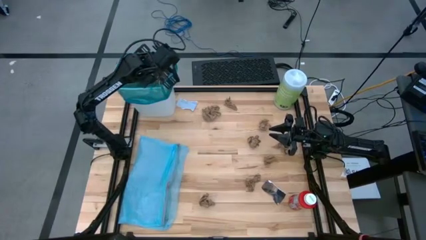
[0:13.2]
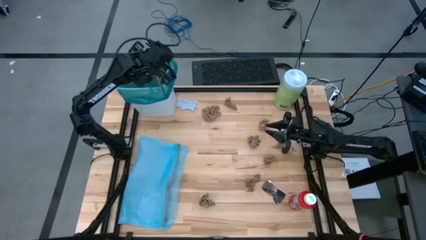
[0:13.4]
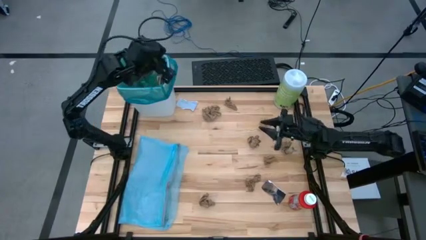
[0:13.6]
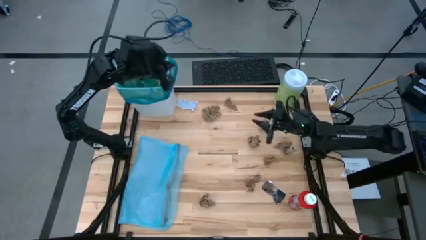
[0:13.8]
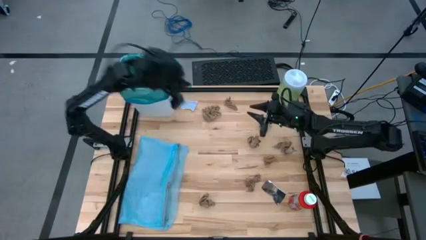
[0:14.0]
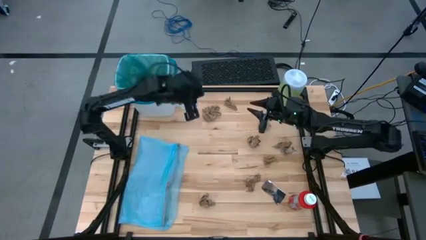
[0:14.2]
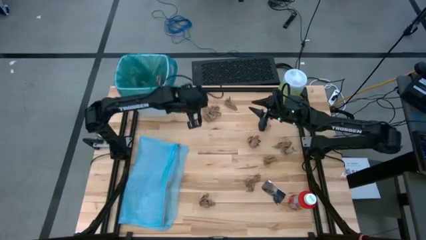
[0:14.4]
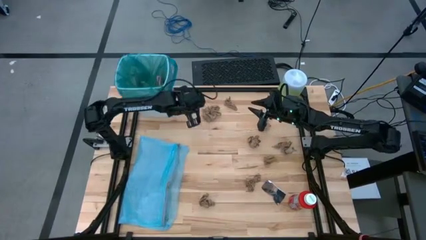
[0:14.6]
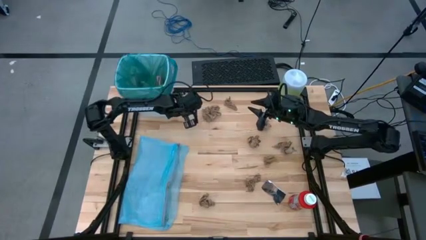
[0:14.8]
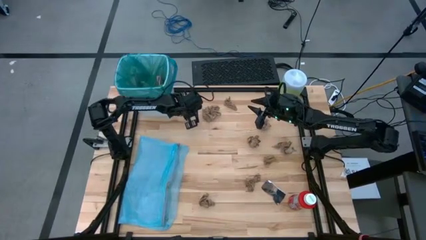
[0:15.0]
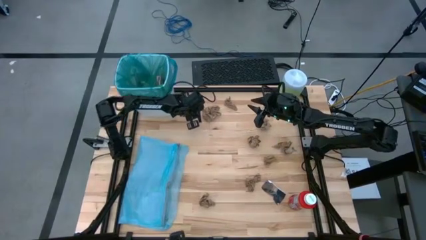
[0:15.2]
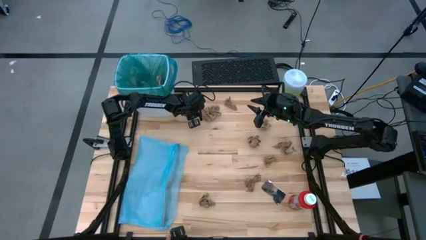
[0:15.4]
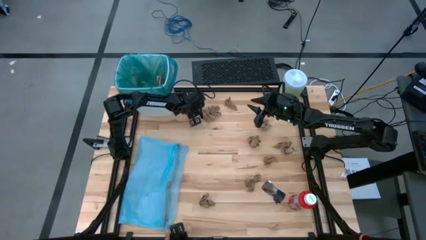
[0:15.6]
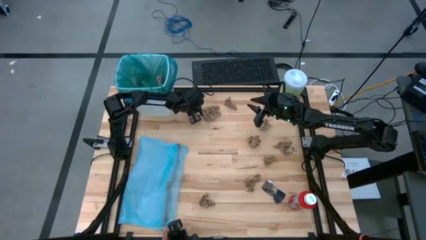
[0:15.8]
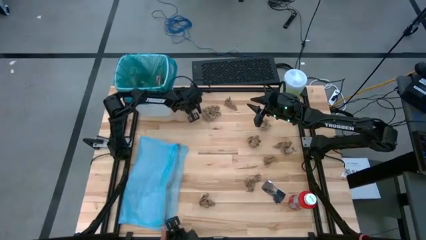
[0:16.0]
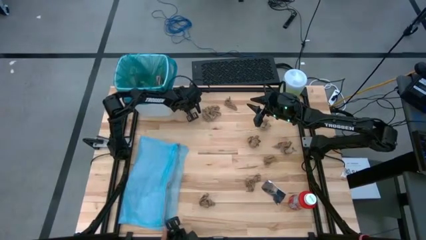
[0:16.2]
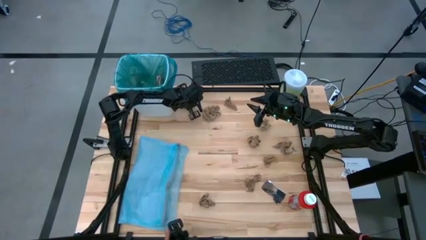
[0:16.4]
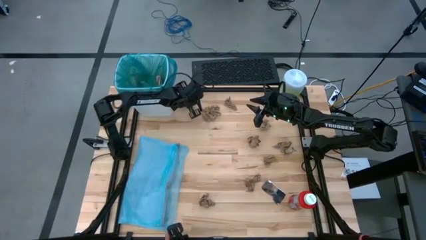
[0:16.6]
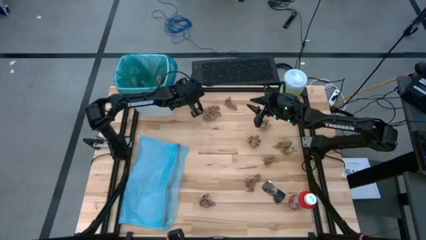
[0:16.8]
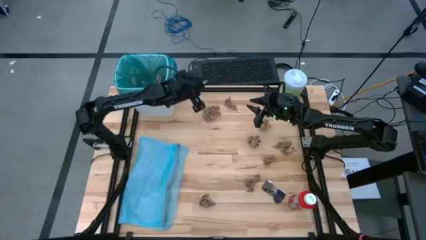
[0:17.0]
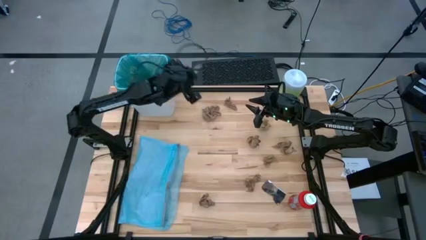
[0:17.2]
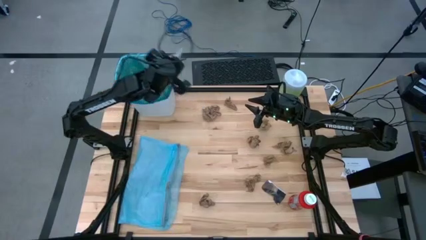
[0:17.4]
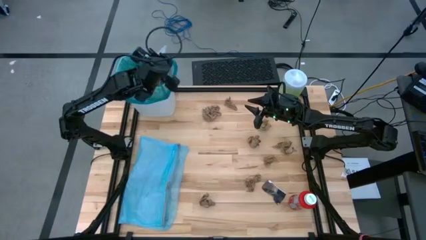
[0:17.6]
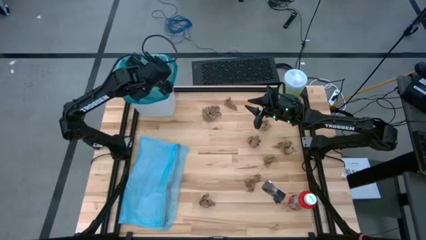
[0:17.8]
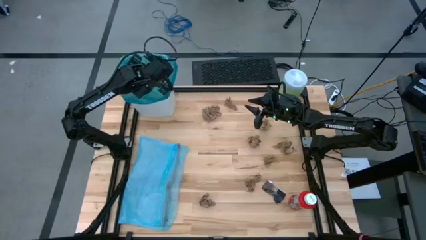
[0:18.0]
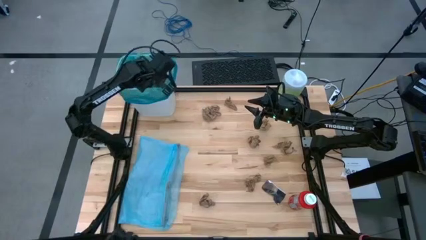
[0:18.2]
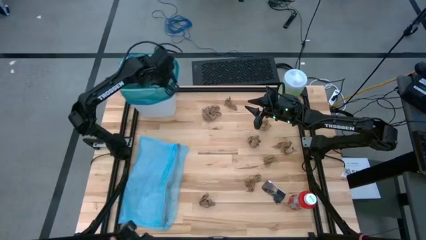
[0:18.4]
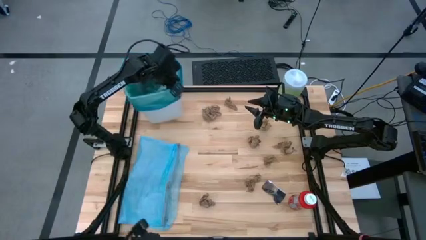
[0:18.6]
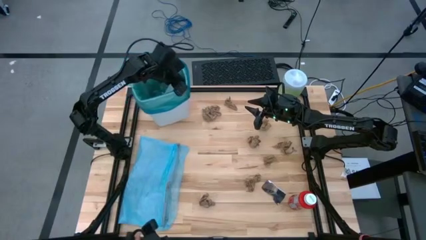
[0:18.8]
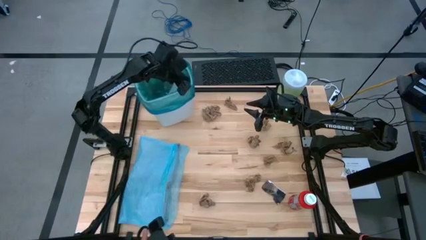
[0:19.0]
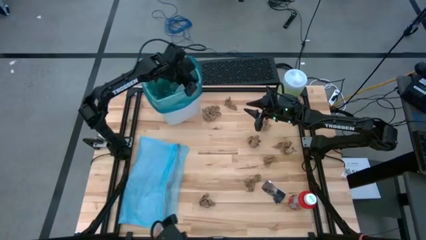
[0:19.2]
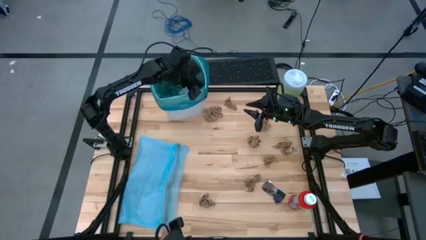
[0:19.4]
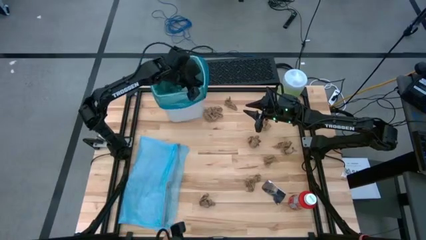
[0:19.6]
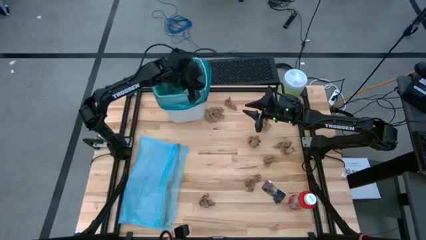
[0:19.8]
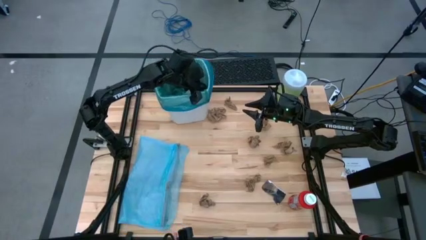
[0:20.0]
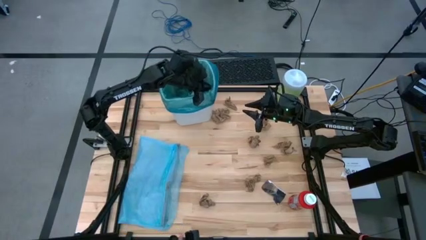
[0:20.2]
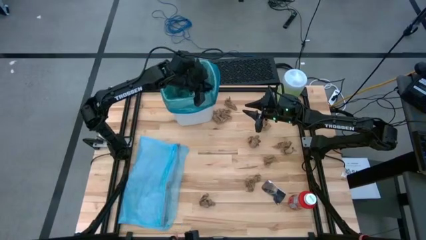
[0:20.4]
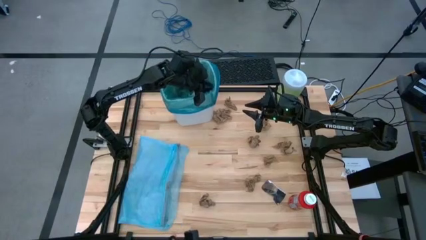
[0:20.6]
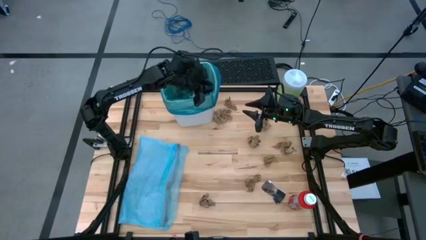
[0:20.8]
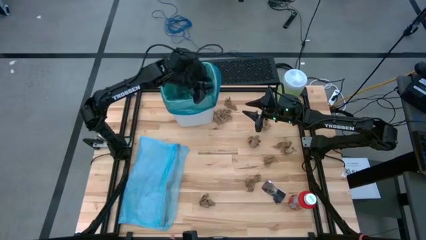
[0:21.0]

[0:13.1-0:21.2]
Task: place trash/remove bag and relplace
Put the white paper into the blue trash bag inside the white trash bin

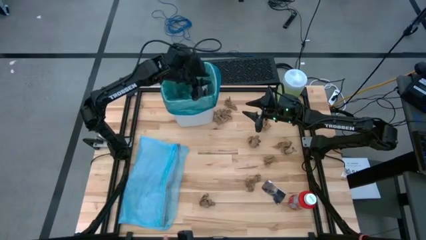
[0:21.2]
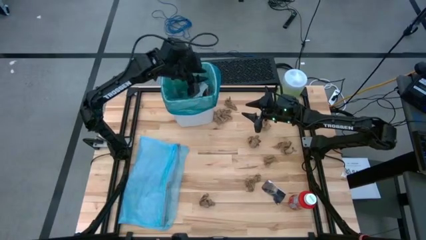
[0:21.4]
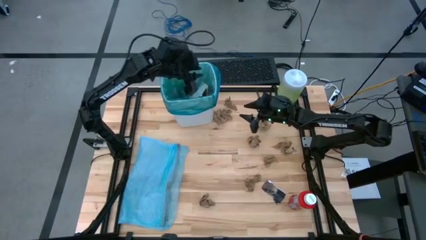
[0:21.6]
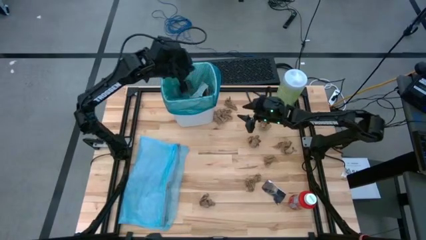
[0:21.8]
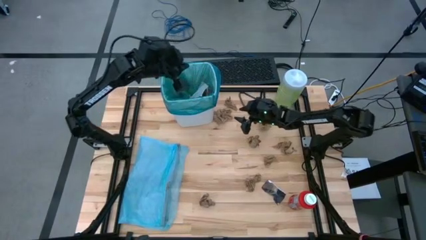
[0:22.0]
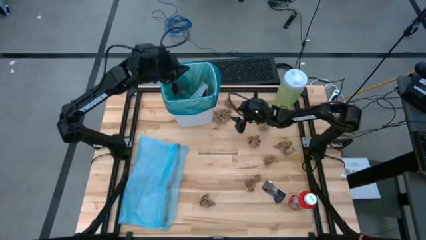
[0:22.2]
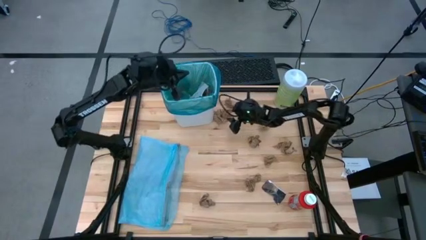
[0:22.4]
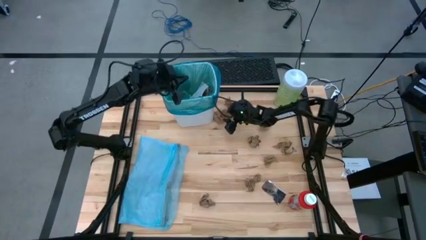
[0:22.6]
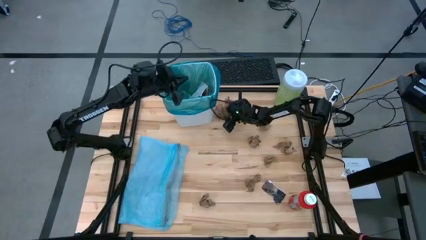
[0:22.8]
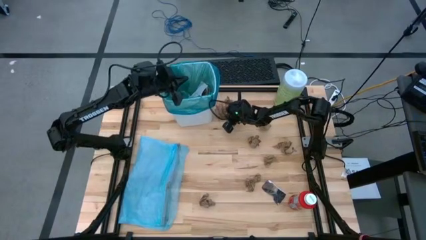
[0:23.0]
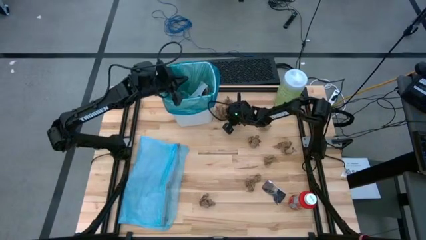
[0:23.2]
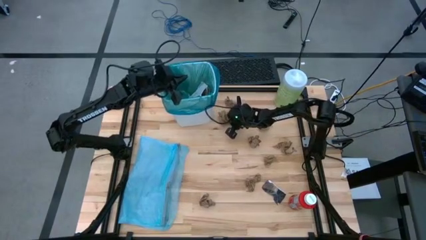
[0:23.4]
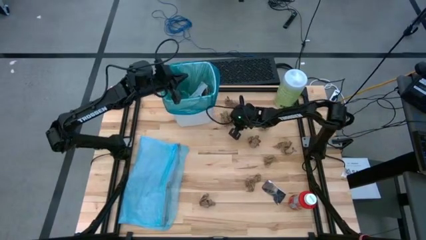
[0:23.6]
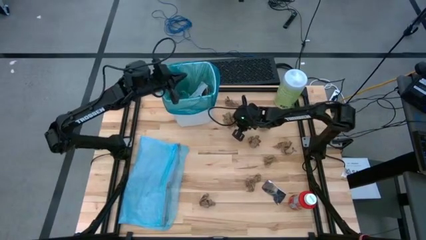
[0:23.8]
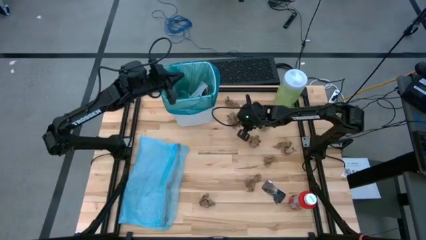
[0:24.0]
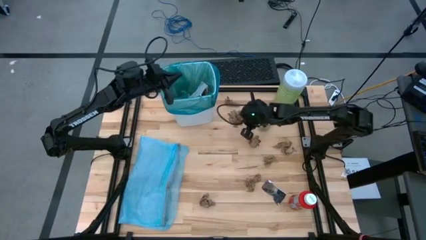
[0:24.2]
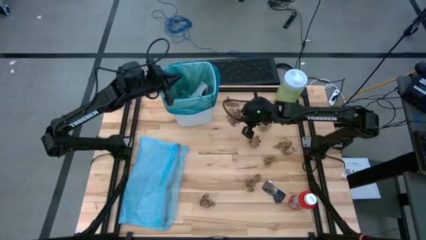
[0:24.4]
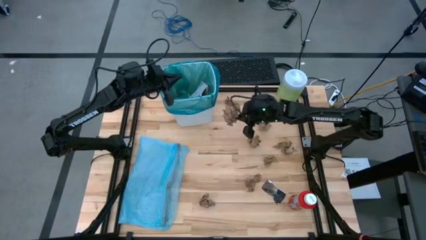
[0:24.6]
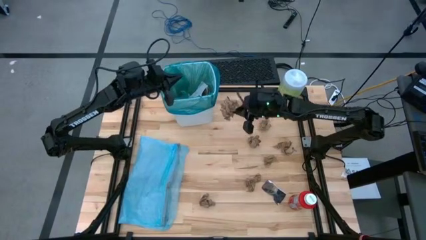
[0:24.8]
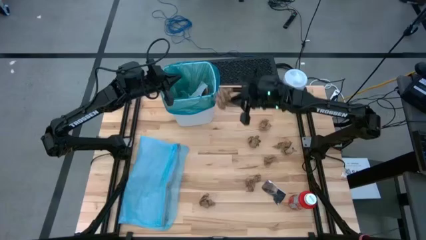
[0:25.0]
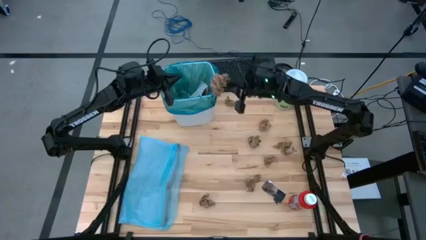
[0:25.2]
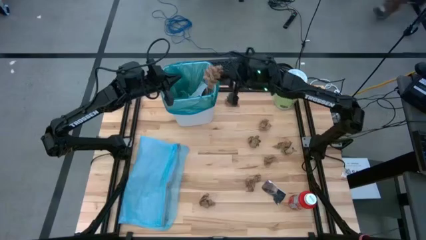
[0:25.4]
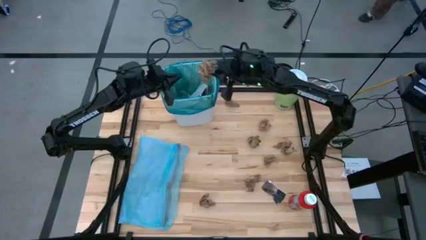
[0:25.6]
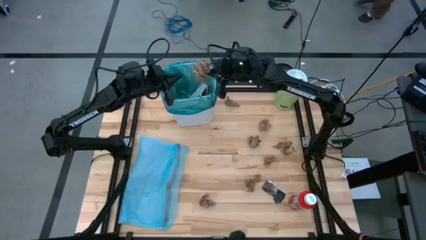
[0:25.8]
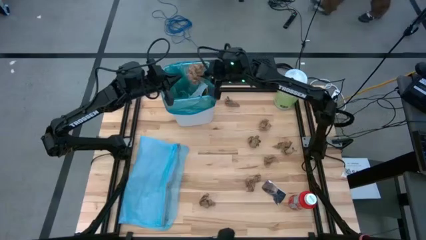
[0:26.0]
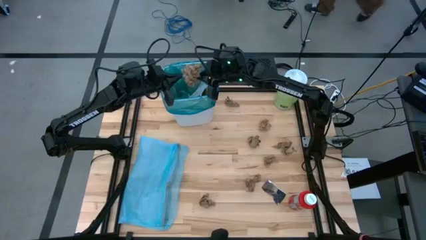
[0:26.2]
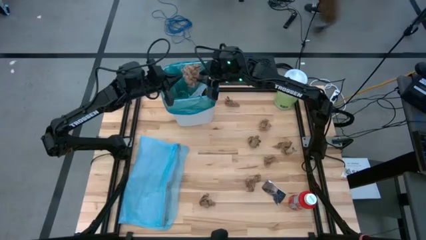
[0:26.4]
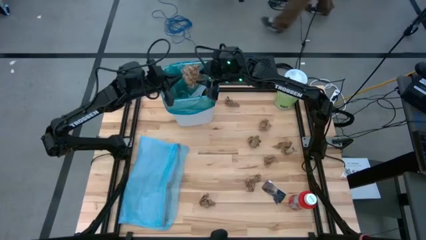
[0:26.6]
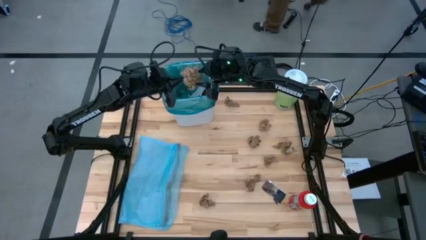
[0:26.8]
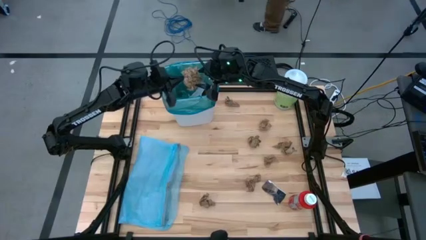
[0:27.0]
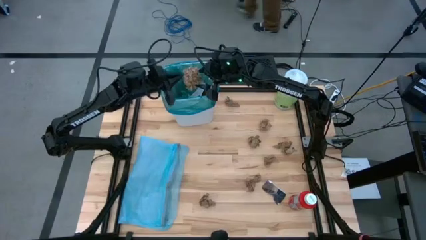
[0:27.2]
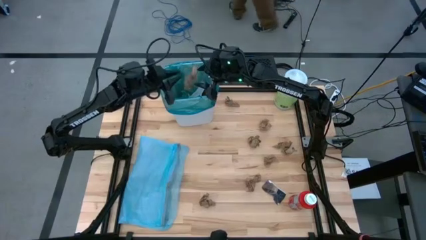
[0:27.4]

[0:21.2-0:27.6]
Put the brown paper into the blue trash bag inside the white trash bin

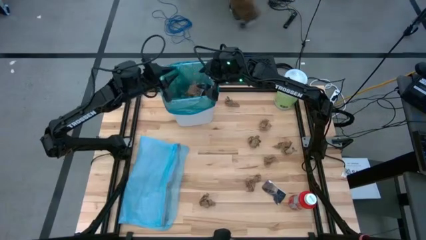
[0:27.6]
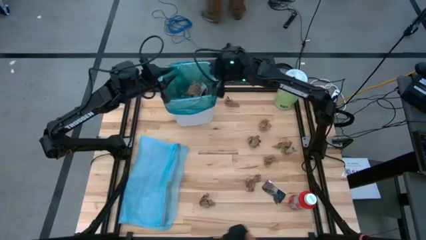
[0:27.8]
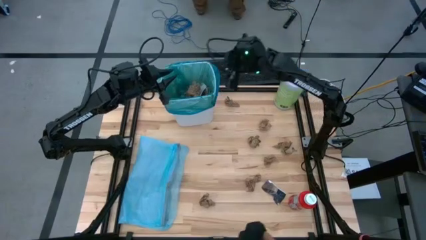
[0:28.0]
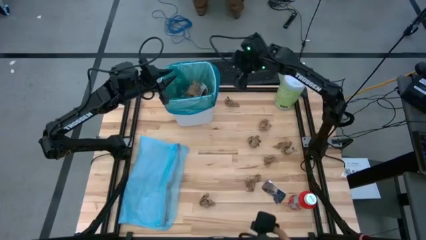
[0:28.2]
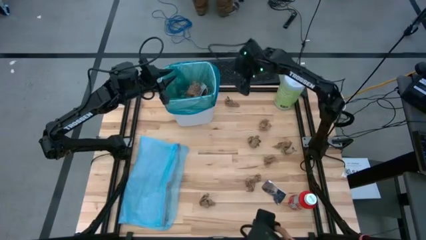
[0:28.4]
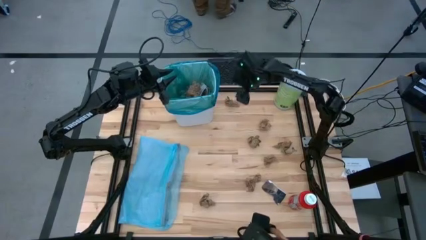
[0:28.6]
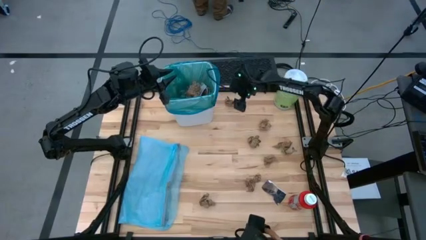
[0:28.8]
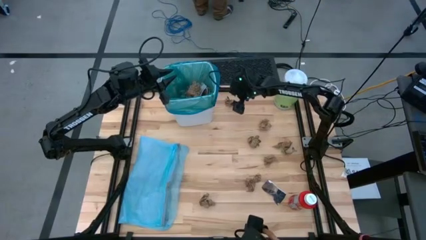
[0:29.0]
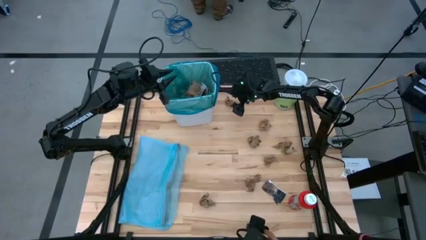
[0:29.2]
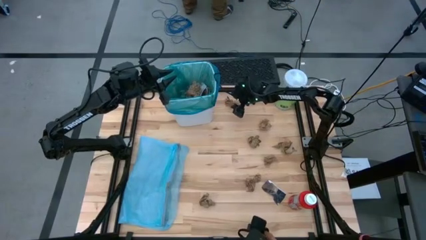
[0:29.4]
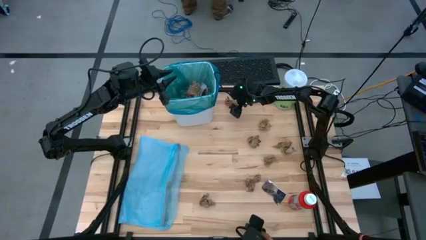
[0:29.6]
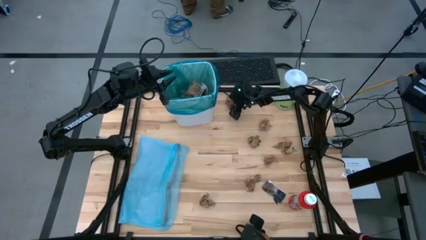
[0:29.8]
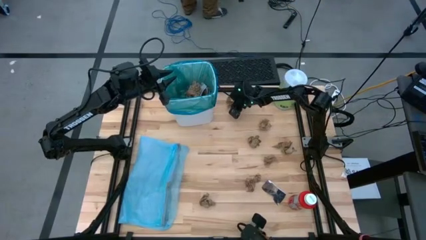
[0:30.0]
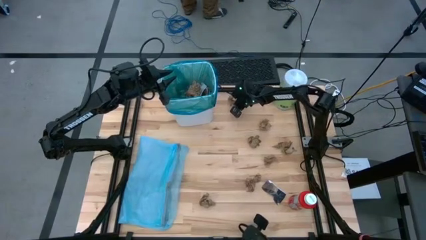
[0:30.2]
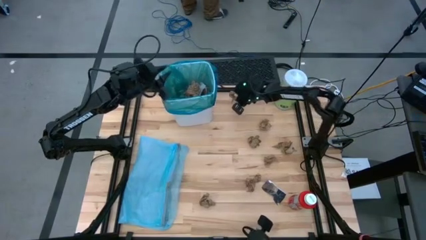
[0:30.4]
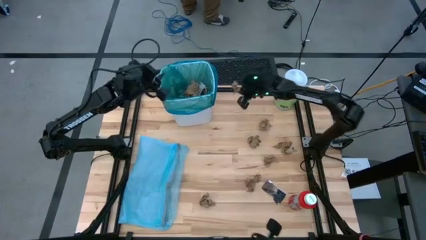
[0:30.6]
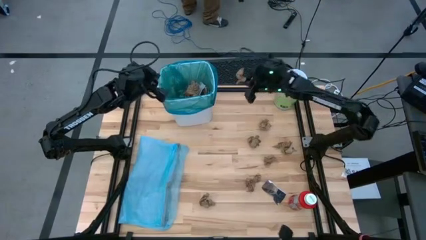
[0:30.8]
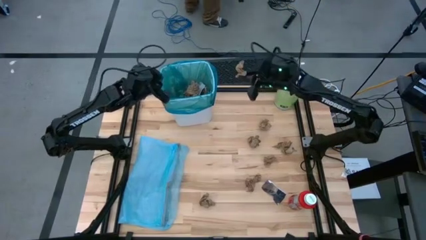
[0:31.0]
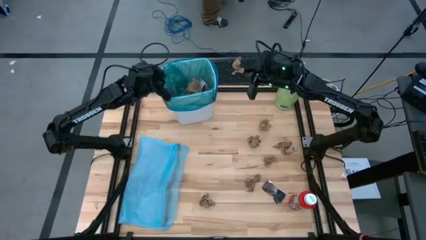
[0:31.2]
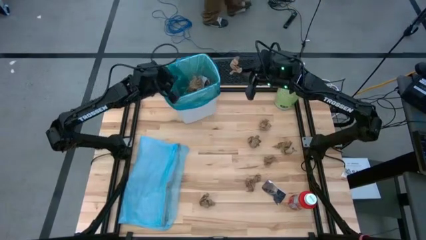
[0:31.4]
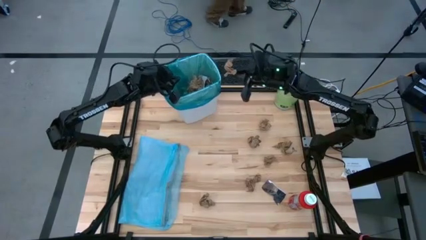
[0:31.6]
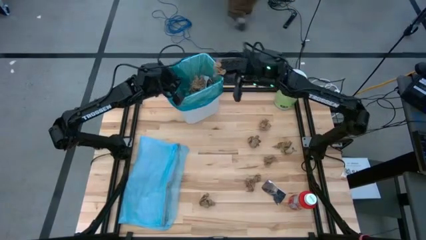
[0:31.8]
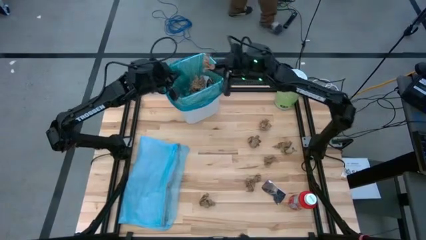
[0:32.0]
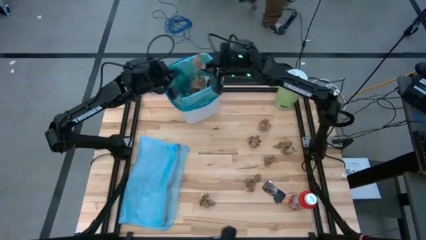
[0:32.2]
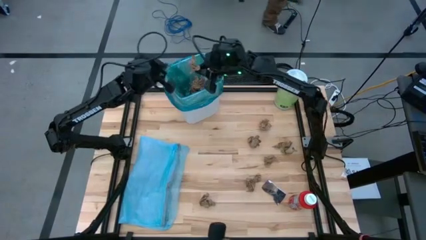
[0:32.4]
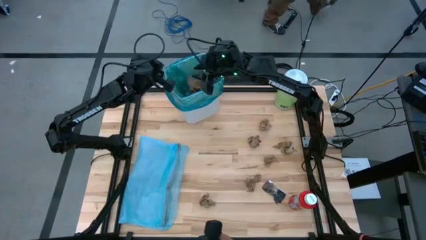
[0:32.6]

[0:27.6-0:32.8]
Put the brown paper into the blue trash bag inside the white trash bin
